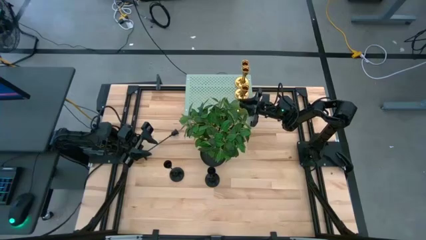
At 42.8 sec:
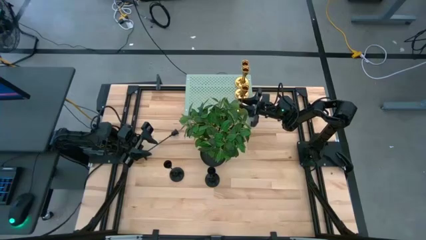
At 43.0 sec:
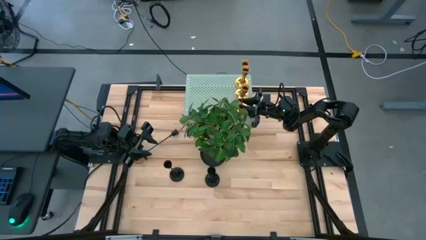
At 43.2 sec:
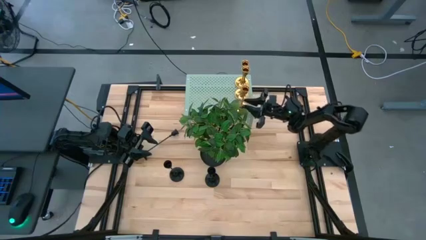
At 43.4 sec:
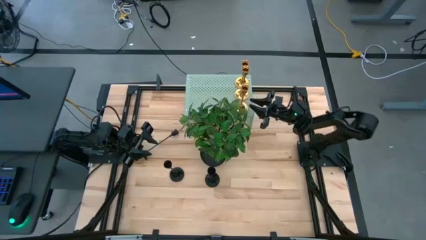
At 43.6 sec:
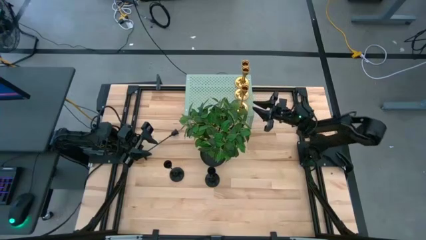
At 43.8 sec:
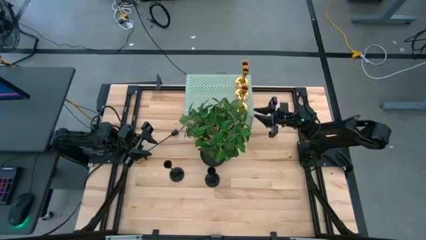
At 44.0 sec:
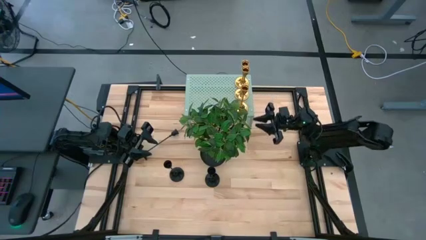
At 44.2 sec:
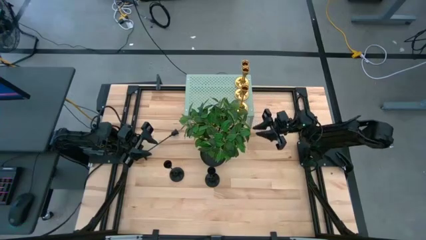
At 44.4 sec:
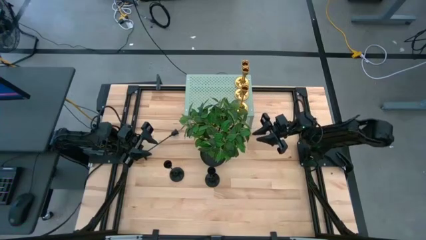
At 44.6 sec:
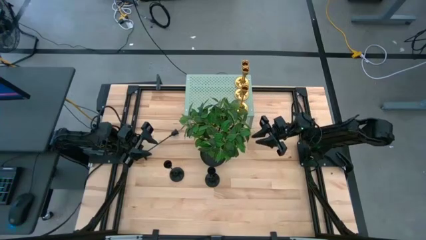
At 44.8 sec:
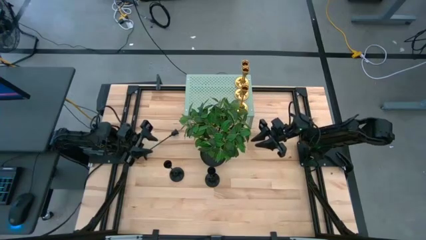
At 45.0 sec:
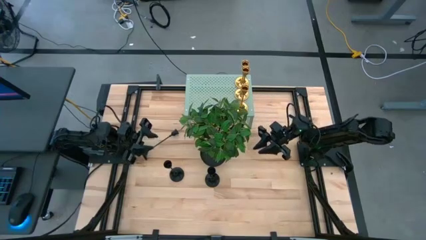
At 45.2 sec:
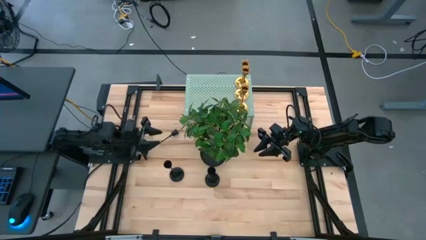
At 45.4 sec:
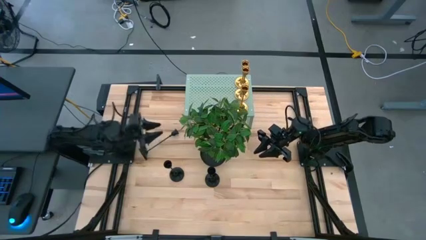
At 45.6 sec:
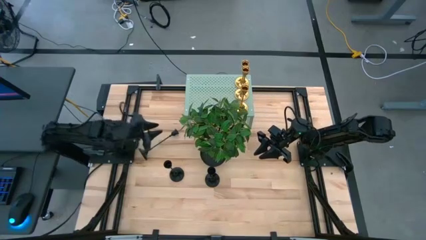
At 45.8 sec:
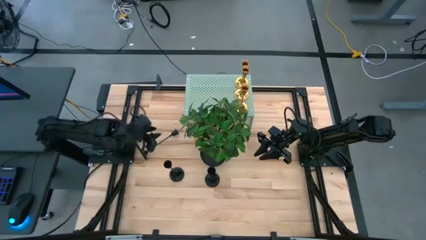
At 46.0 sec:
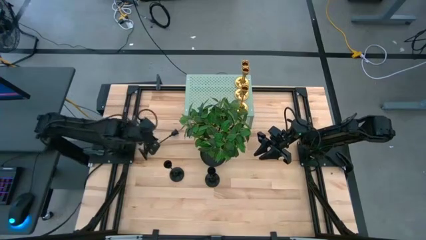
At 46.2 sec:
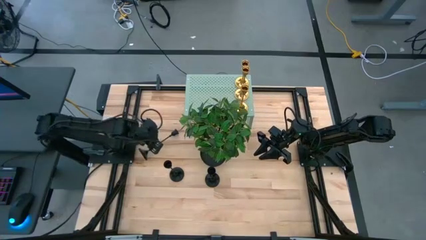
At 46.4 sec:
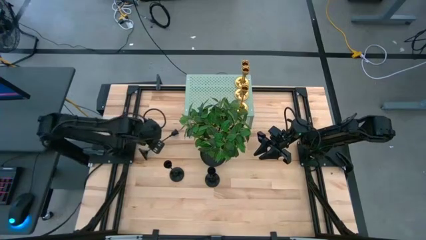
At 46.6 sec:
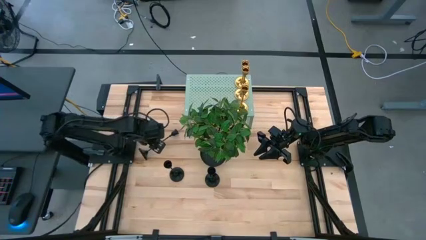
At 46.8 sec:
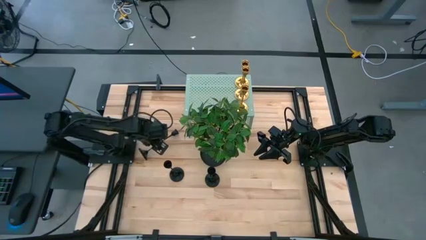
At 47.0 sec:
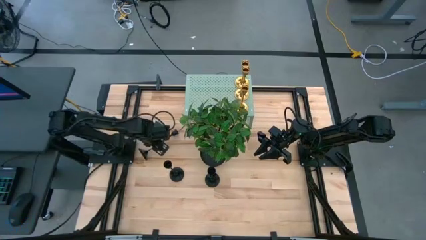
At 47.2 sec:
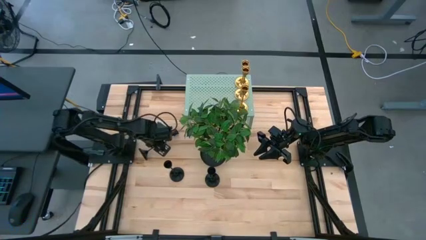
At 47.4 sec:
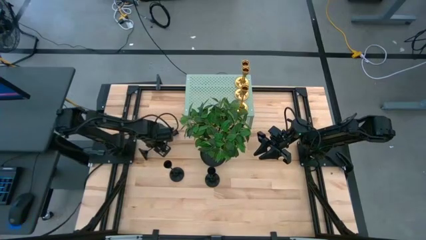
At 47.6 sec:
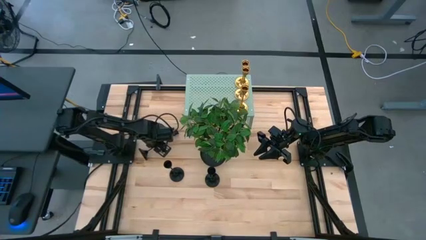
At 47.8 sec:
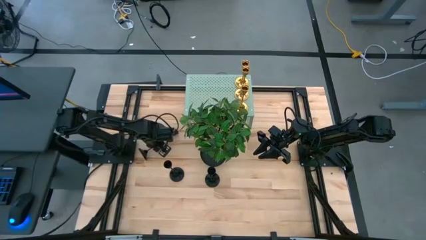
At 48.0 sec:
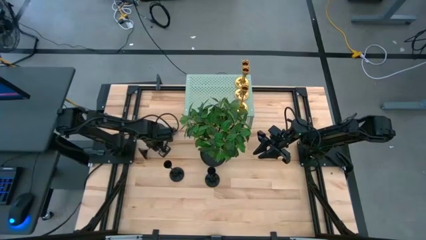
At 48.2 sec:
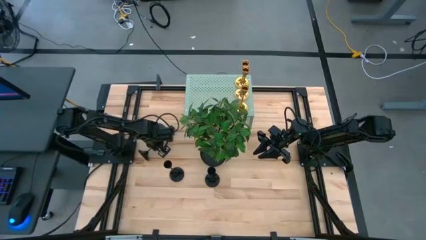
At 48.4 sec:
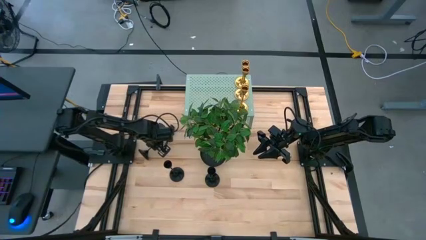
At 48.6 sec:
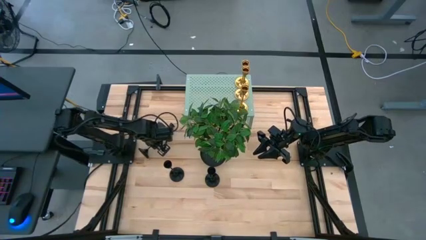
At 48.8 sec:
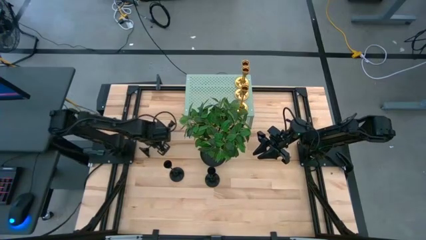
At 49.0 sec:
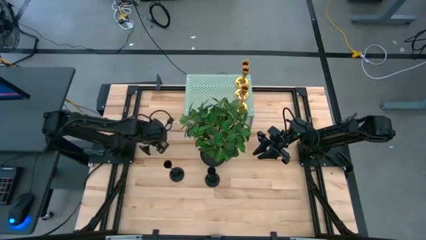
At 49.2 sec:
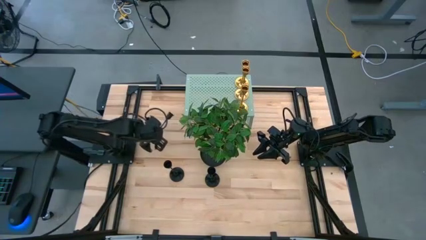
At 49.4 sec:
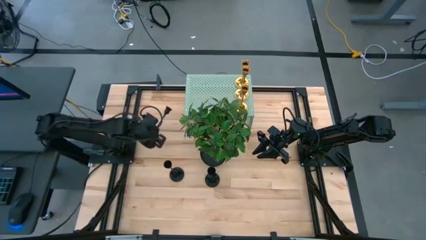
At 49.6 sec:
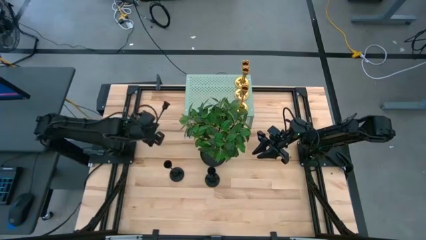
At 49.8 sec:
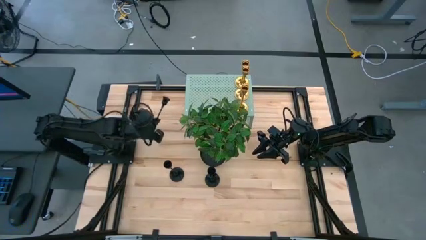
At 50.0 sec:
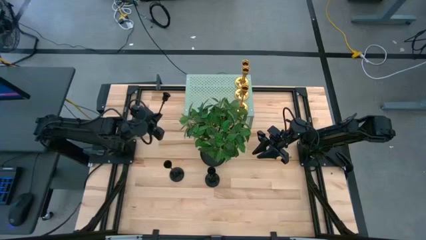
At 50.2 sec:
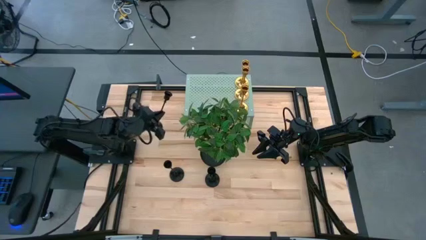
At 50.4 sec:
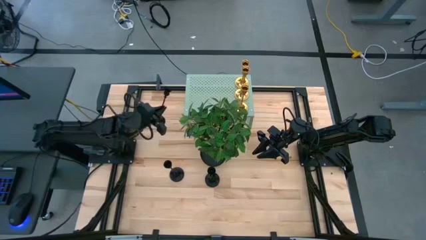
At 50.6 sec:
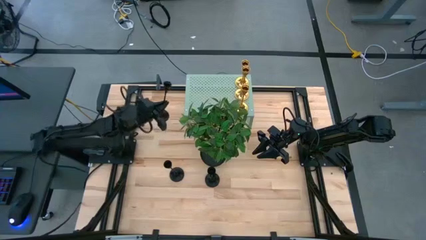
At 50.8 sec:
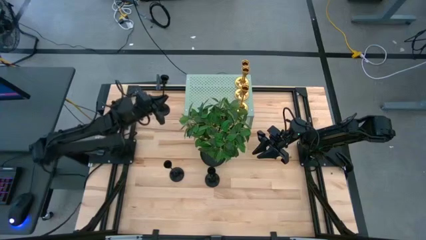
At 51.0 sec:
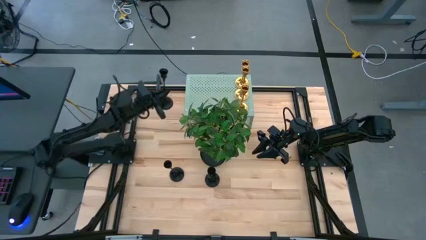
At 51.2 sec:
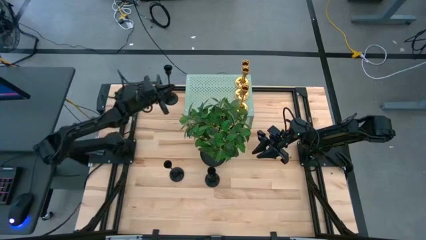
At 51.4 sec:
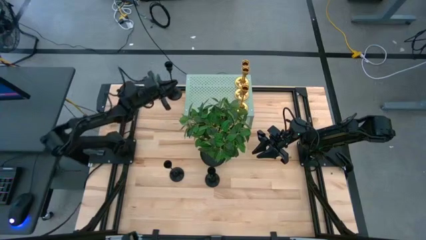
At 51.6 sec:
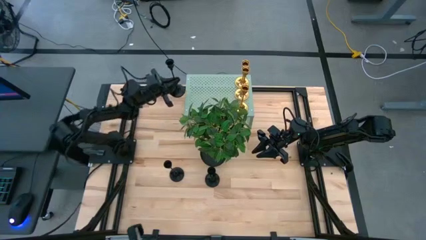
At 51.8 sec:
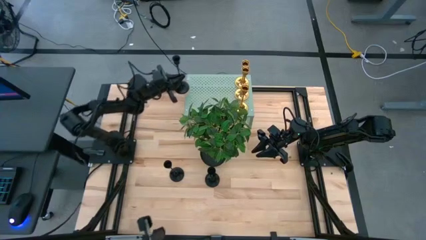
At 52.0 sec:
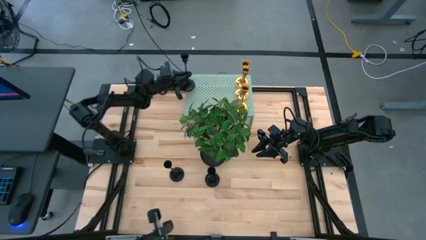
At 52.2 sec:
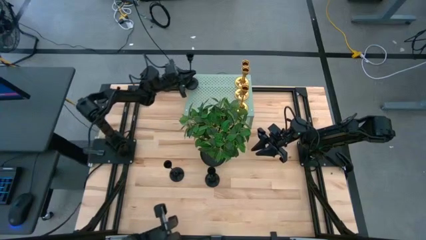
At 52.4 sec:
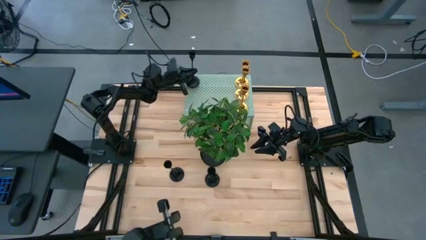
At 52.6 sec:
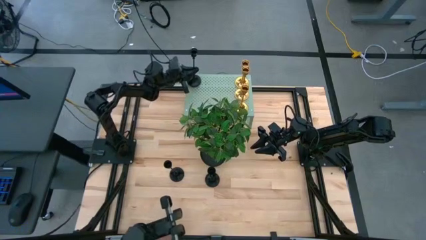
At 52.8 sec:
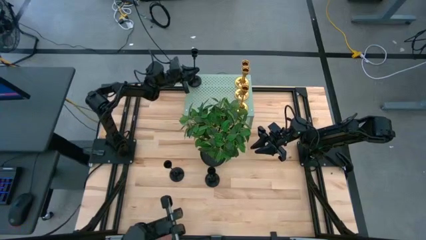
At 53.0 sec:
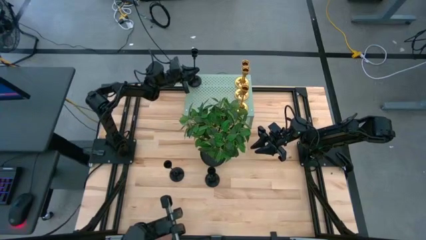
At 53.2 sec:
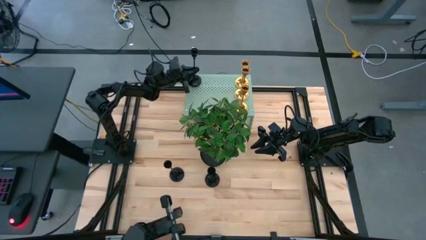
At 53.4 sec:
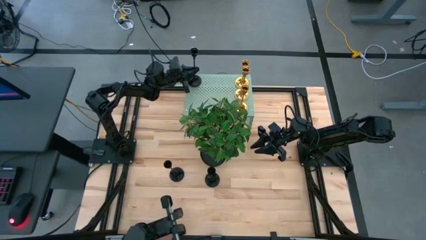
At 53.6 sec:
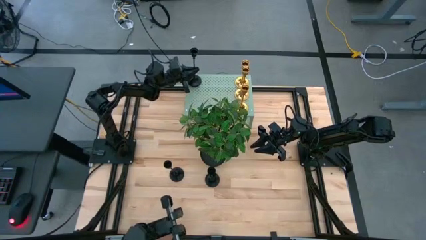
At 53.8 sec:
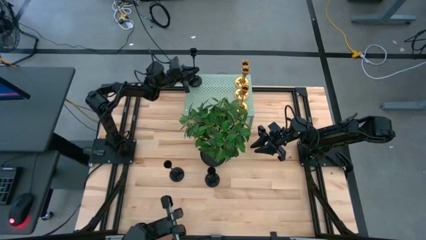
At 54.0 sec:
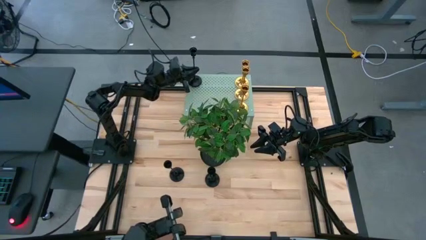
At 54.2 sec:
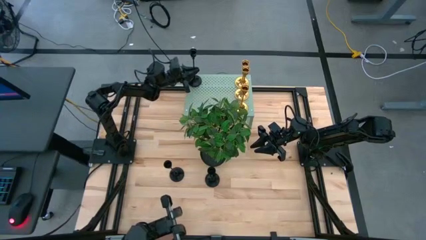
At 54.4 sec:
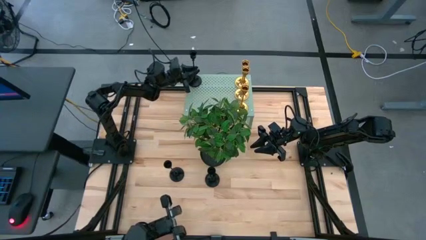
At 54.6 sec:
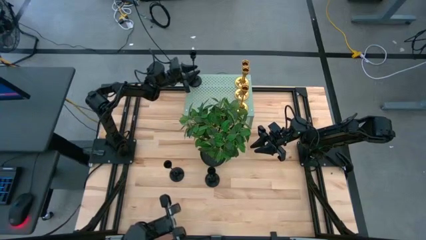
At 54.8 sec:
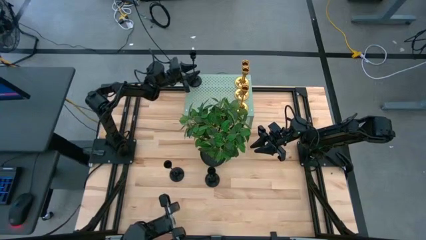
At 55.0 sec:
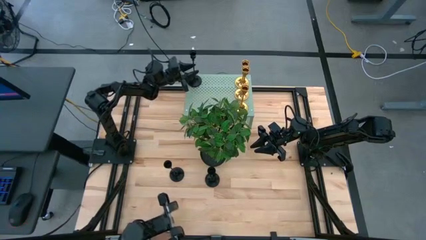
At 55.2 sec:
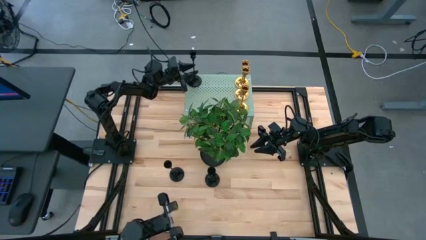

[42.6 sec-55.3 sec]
Task: Pick & Place candle stick holders
Put the top left black candle holder on the shelf

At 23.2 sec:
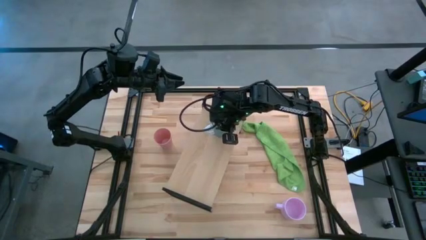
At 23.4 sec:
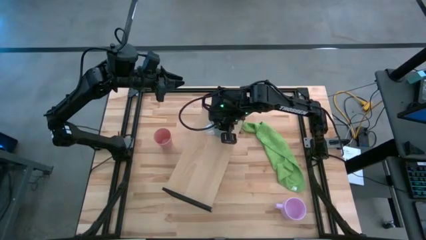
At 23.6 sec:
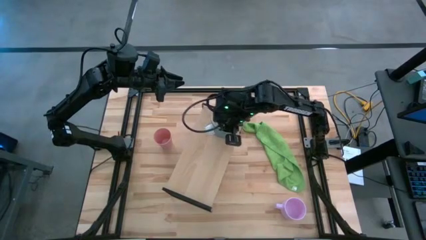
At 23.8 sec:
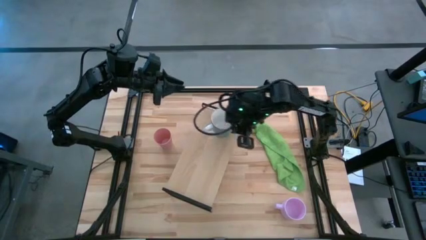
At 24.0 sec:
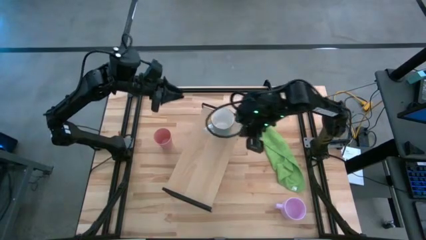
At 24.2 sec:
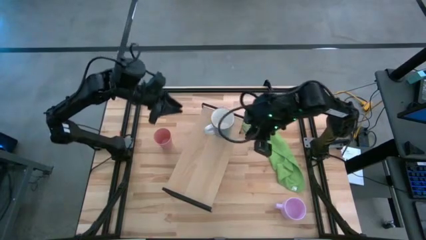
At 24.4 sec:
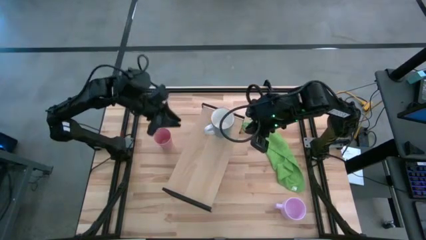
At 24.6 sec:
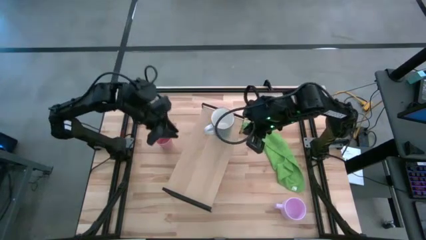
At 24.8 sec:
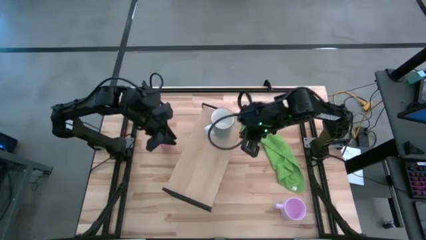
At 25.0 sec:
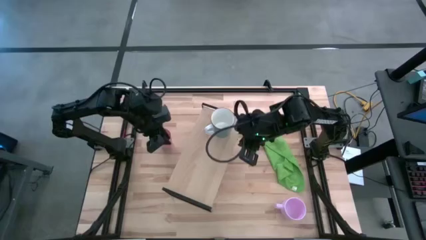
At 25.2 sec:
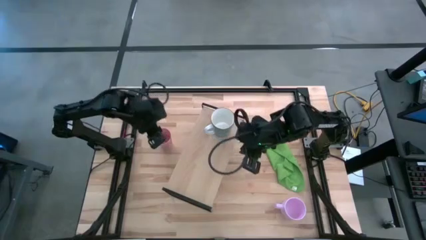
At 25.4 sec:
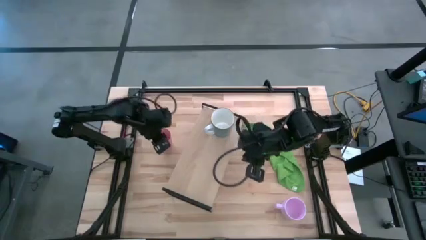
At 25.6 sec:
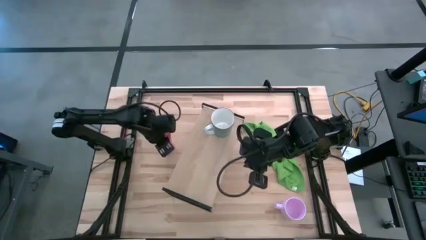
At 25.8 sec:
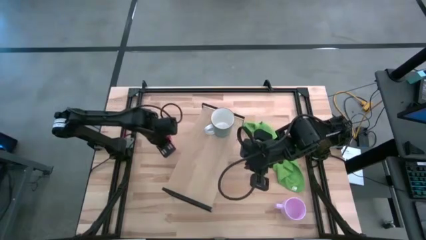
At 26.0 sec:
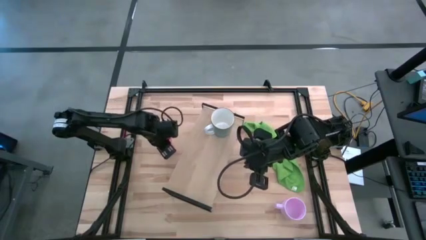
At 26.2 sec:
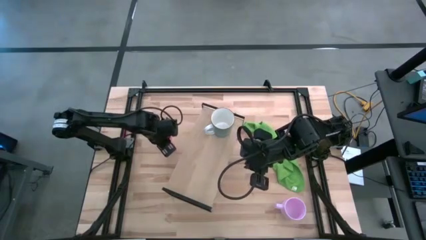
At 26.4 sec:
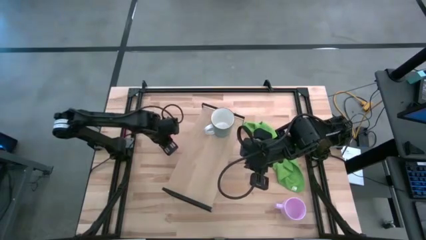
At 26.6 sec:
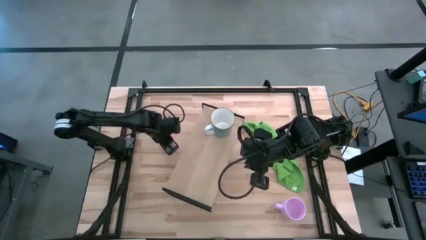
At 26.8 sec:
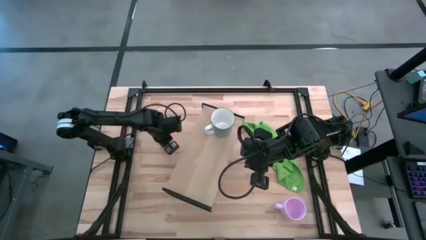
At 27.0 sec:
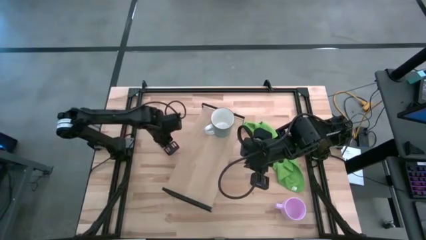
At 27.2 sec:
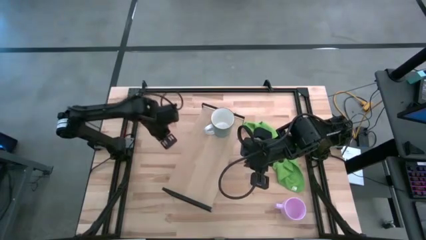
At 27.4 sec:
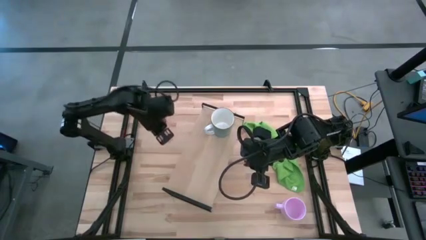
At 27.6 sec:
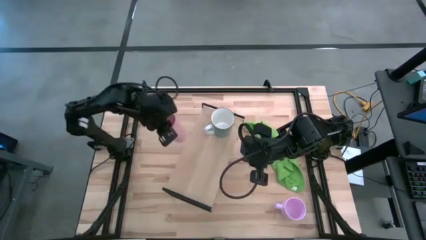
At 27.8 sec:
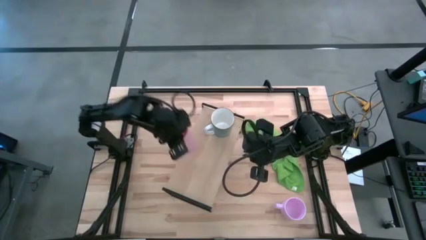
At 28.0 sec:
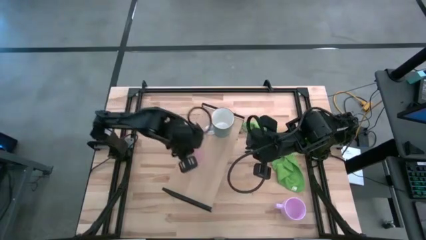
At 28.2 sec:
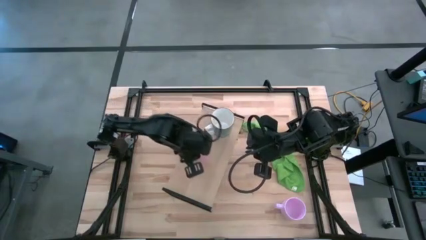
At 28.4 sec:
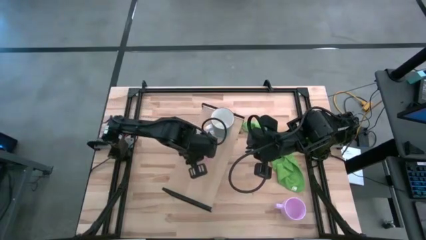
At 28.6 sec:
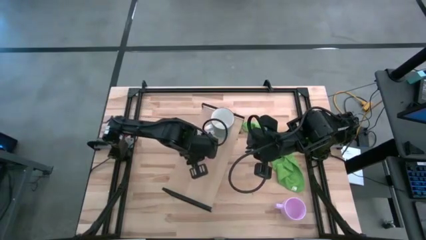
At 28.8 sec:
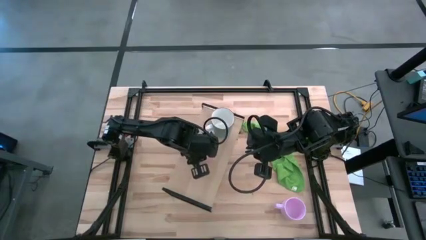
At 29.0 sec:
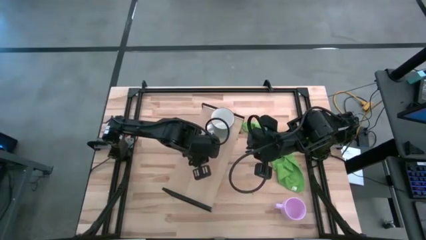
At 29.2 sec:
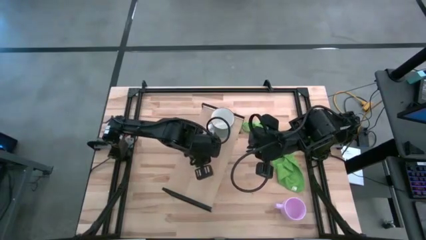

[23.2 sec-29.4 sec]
Task: Stack small to large cups/mugs on shelf
Put the pink cup on the shelf
